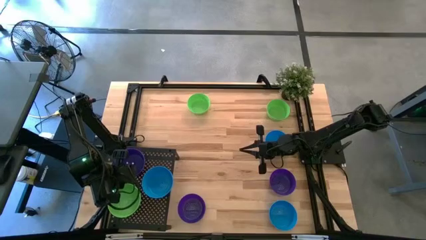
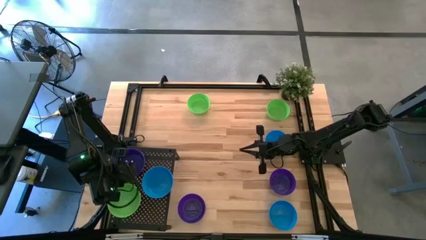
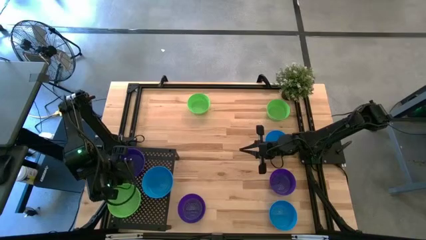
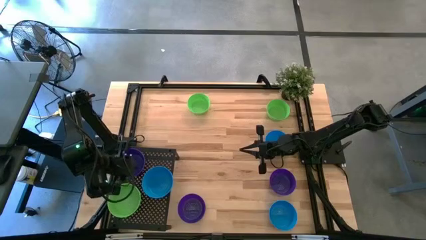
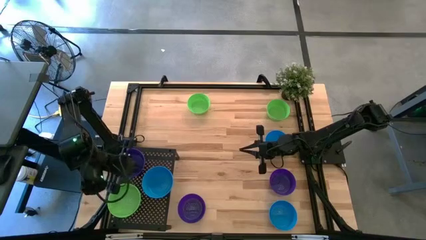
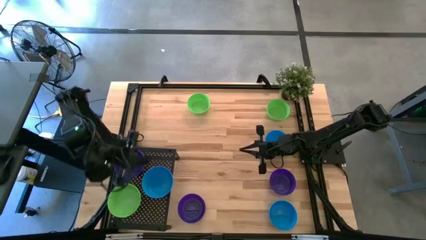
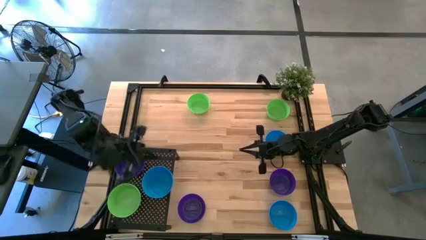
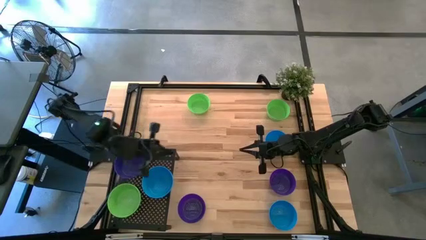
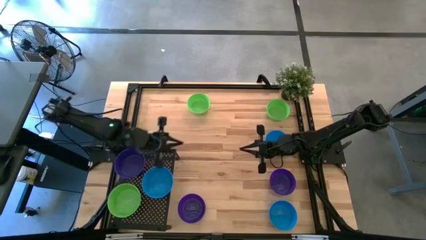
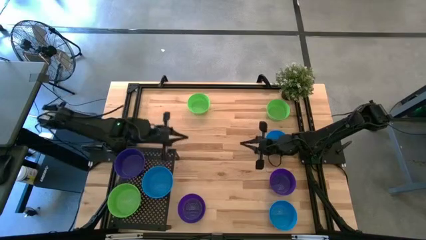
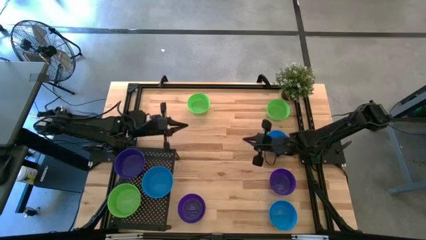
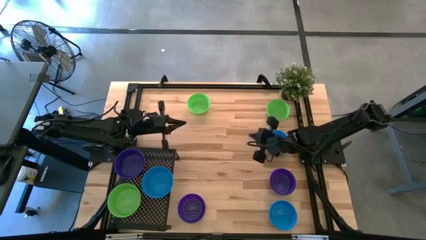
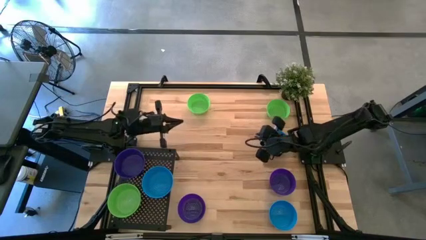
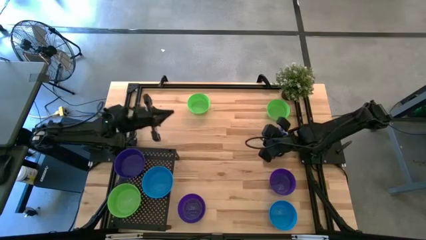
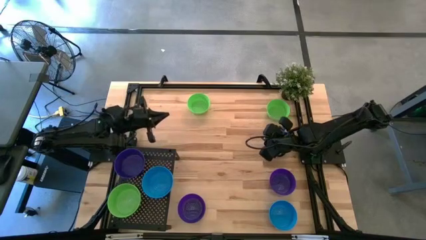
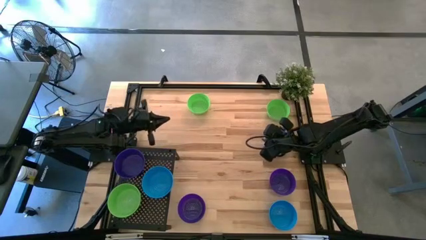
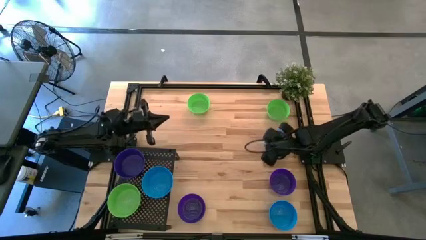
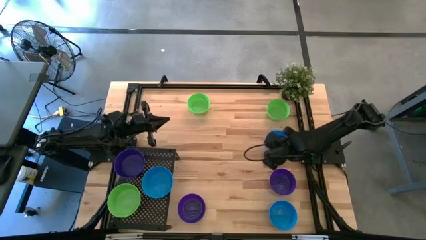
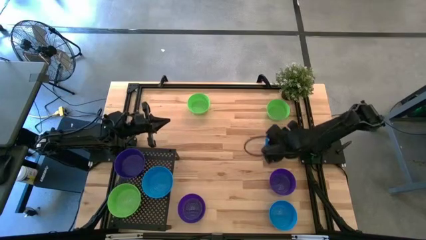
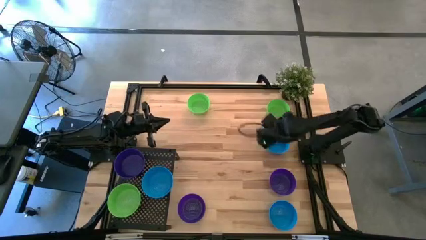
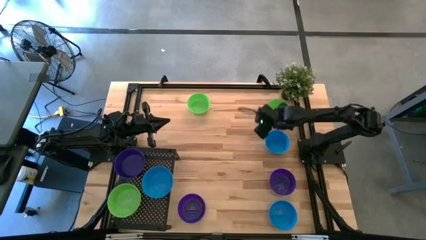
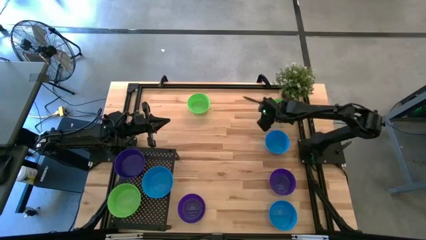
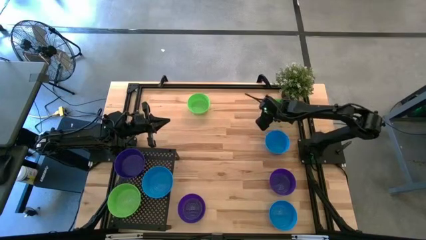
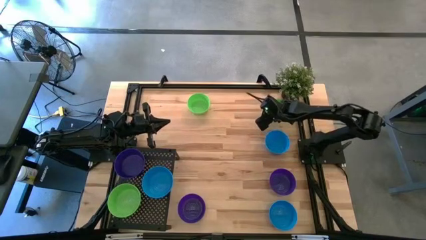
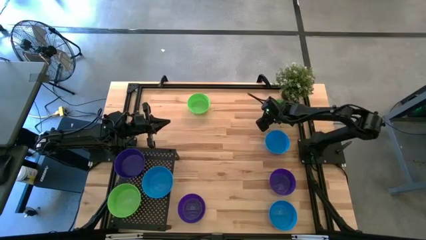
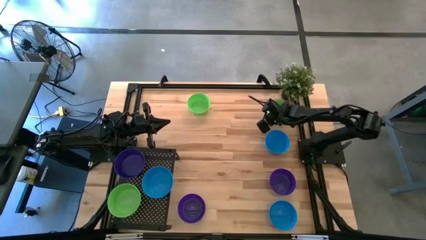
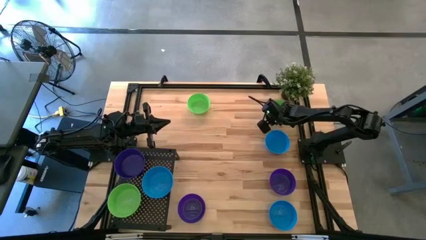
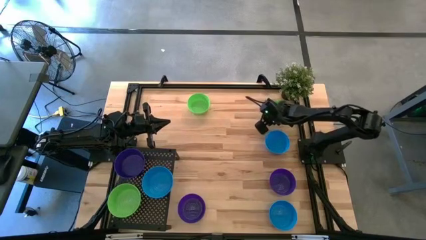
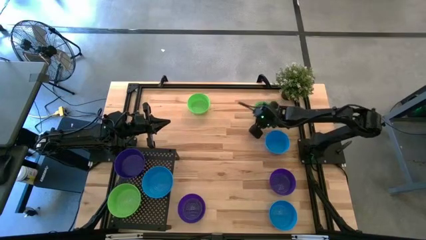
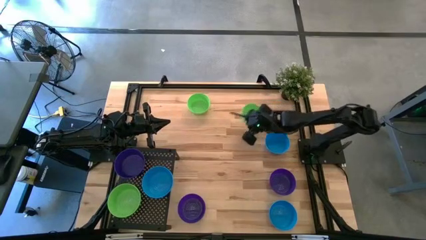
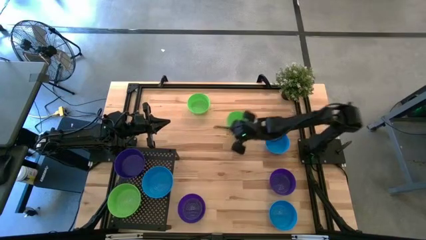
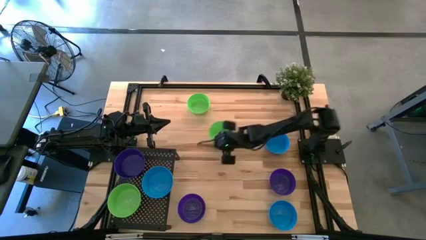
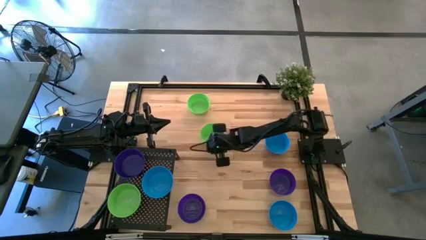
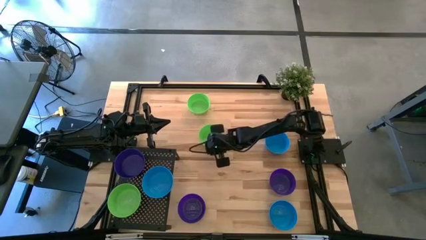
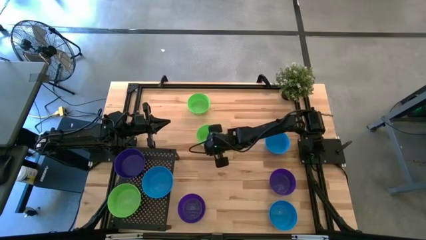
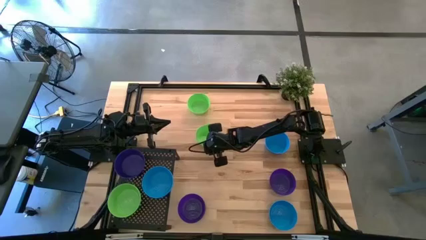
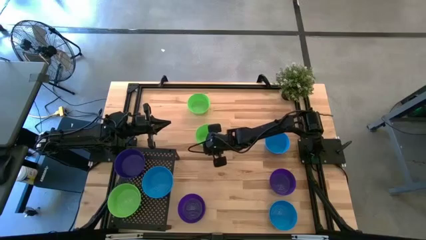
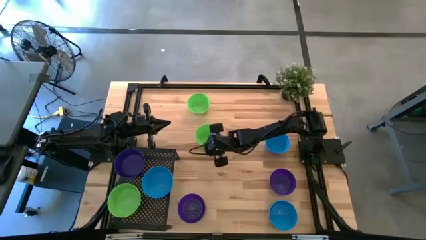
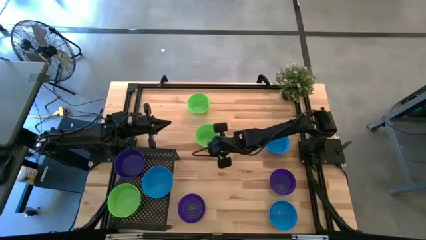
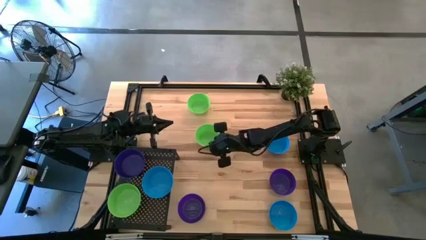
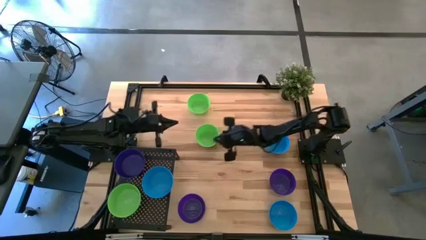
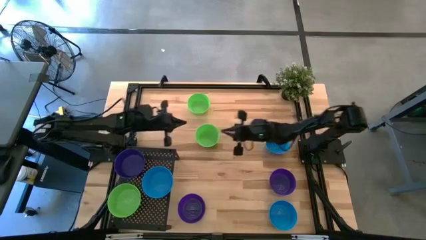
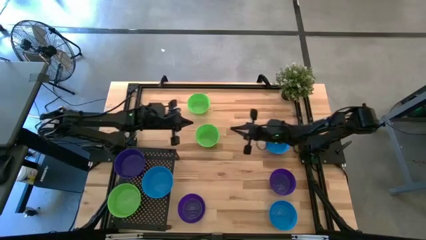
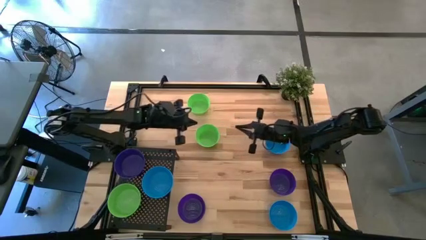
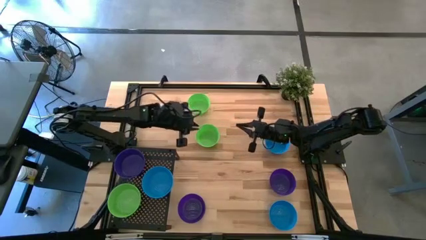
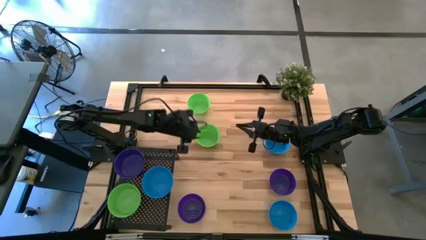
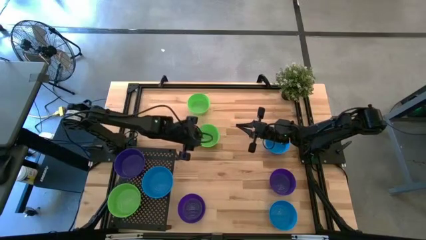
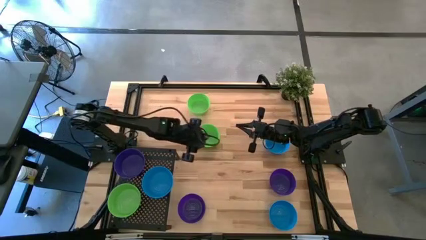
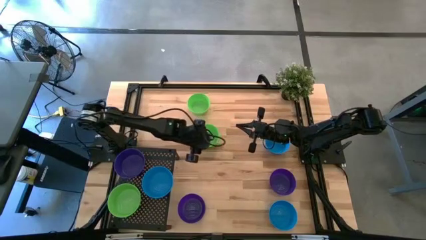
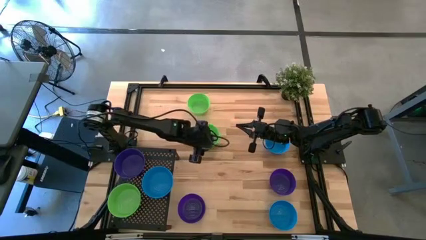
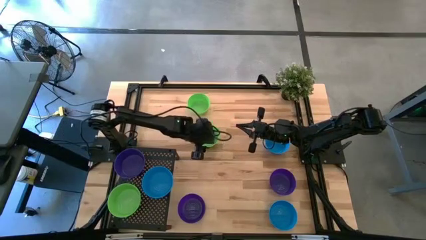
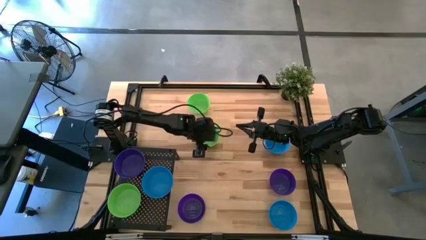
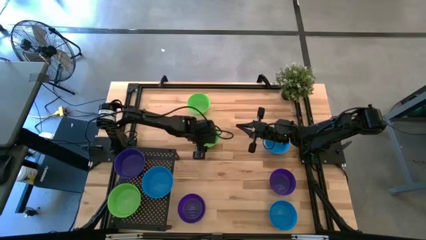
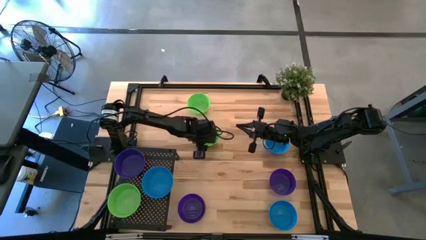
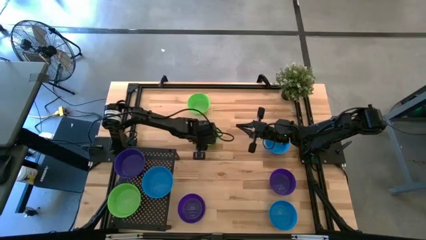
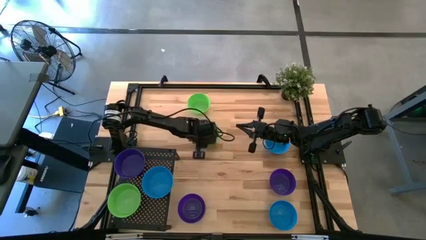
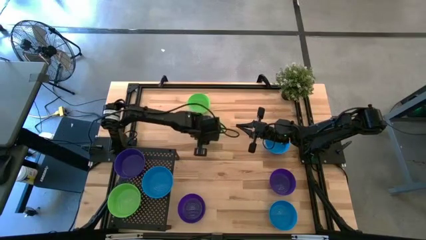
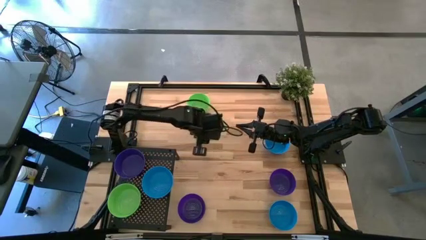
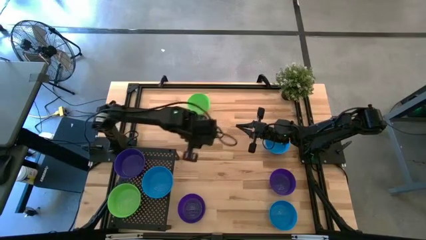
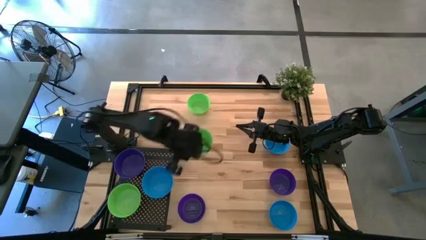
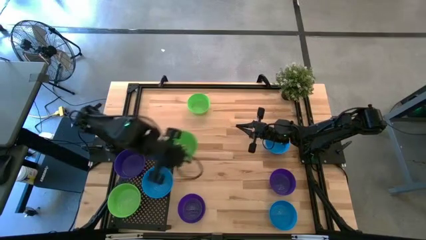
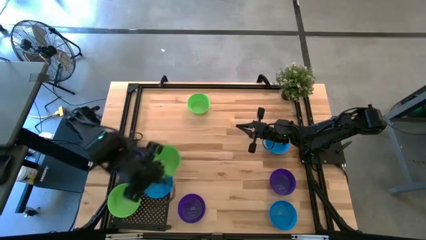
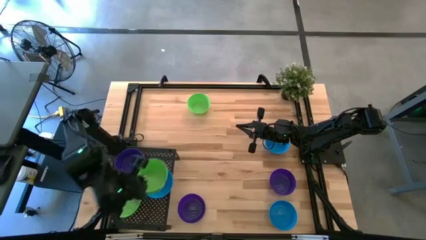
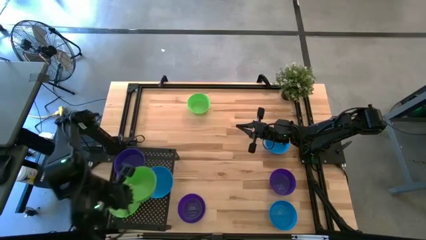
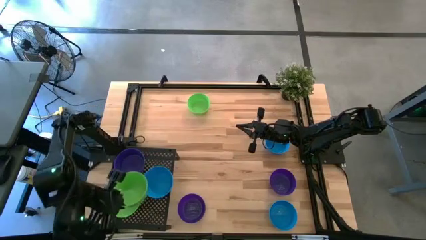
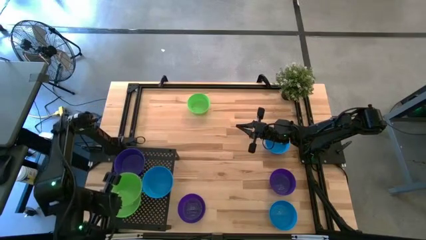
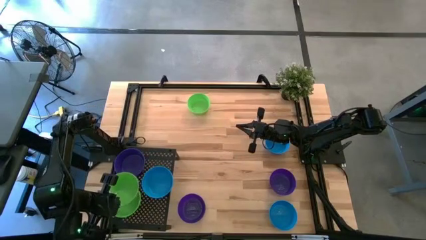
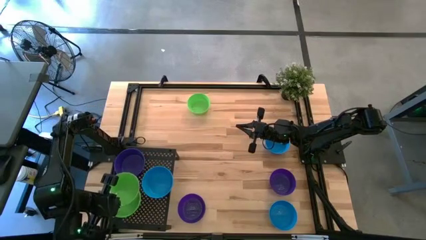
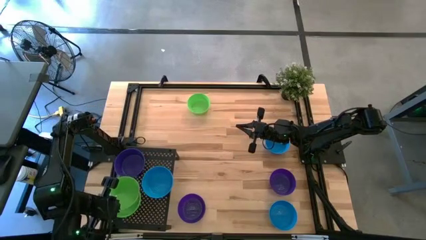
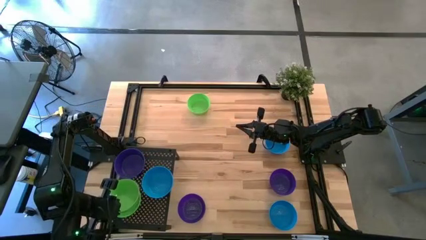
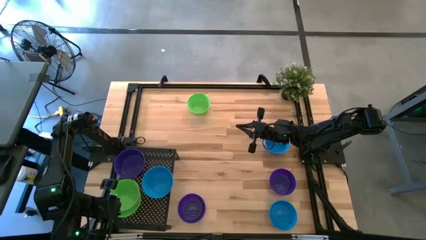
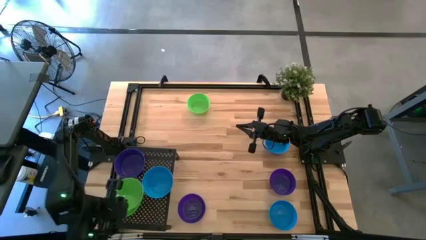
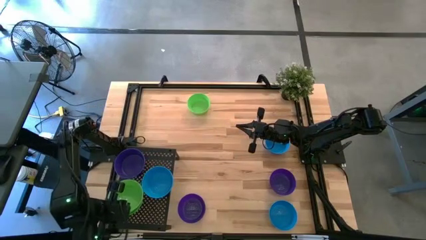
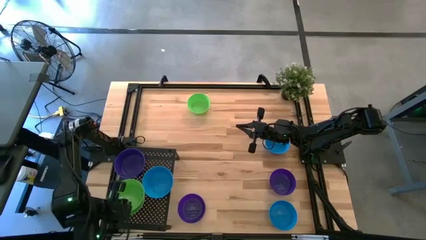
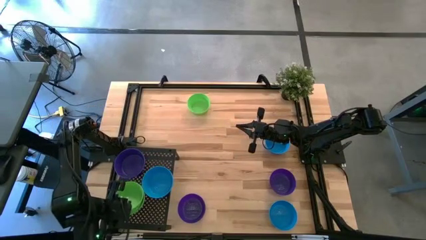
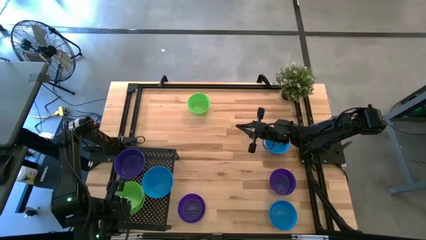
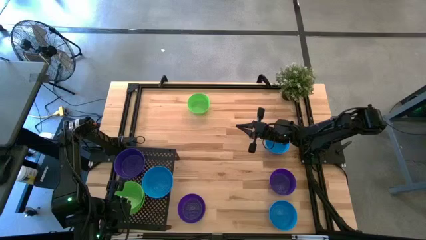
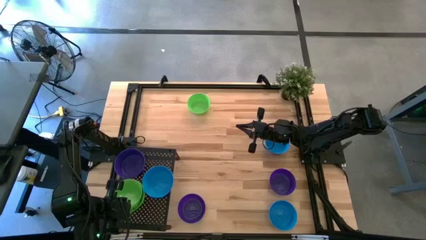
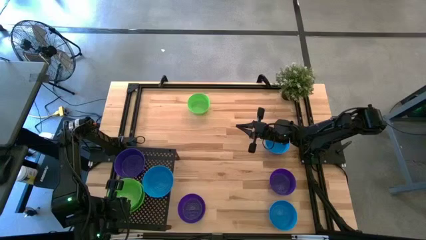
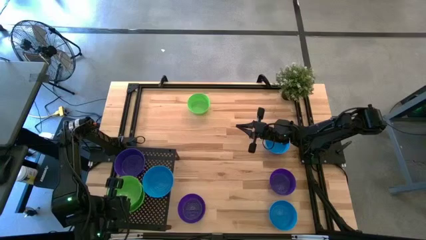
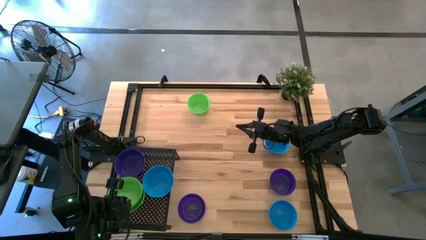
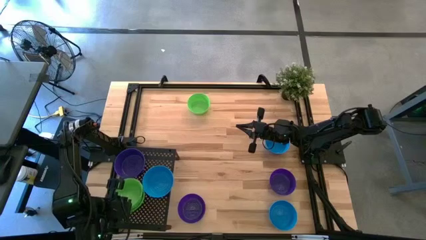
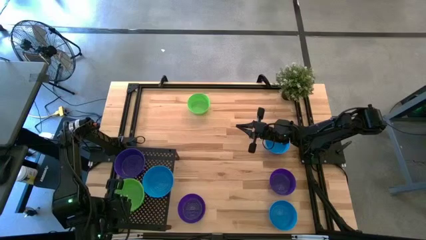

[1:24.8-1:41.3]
Task: Pick & Place Mini bowls
Stack the green bowl on the other green bowls on the shelf
